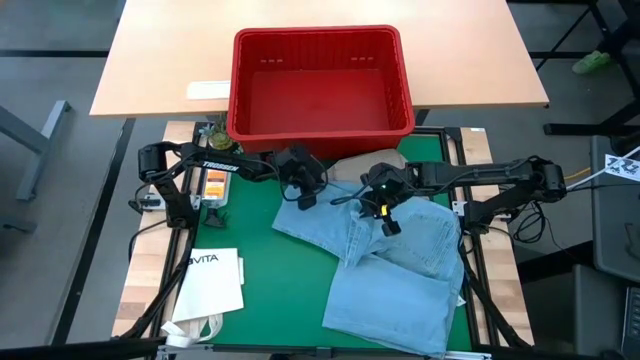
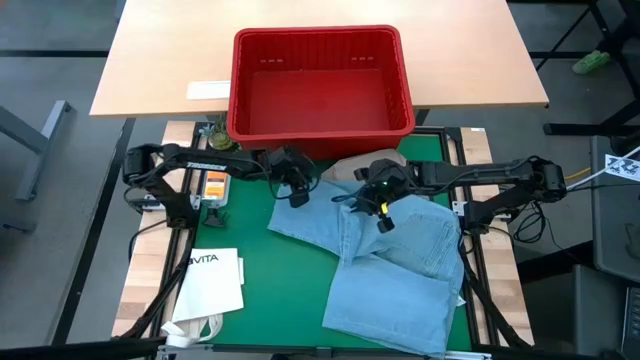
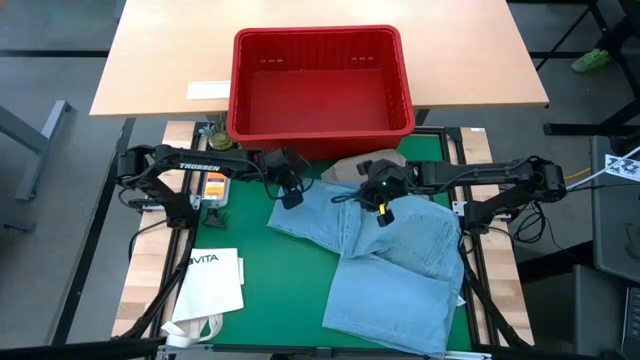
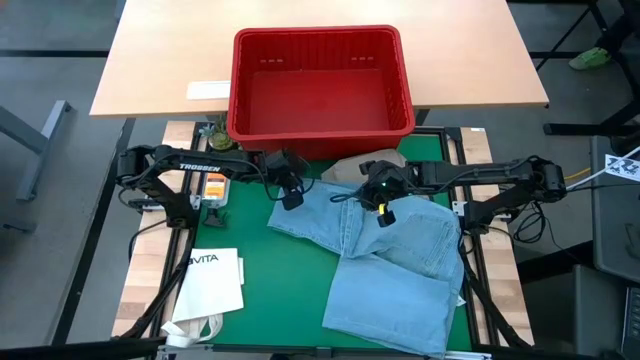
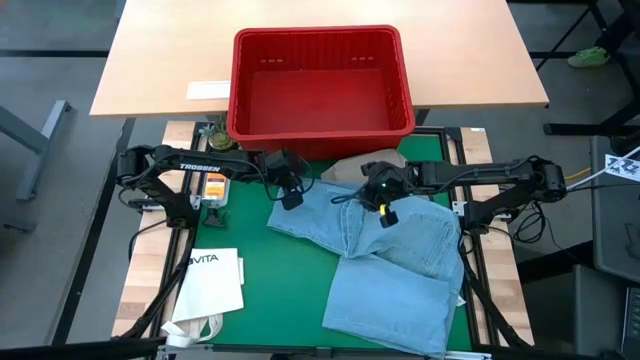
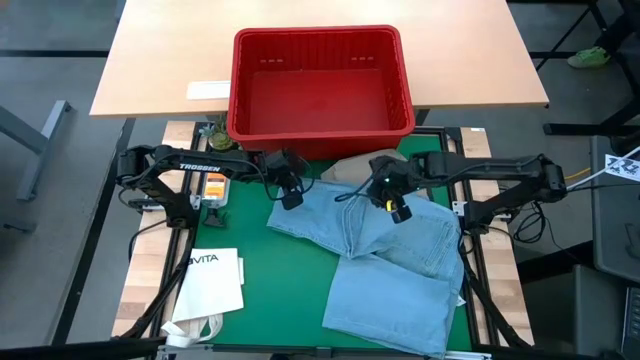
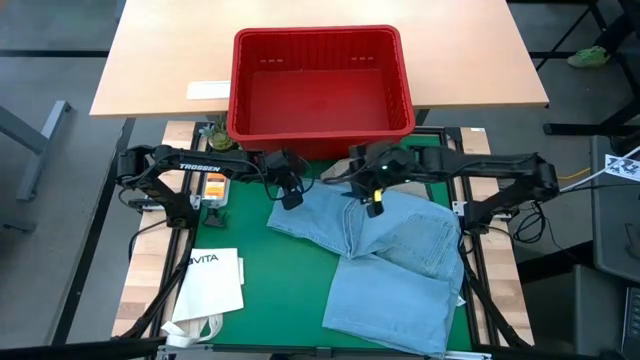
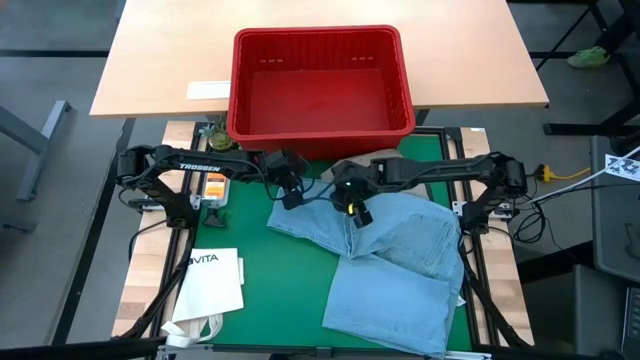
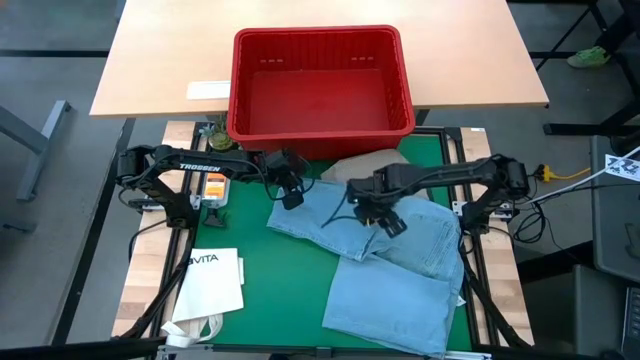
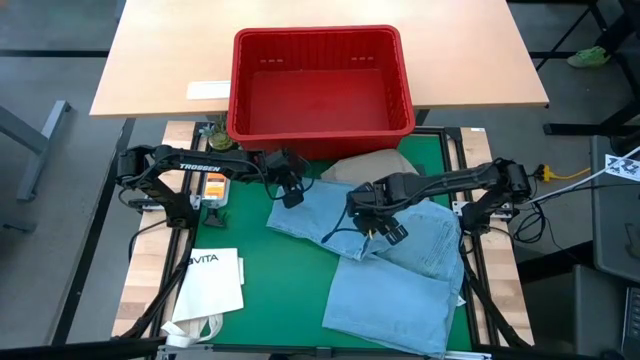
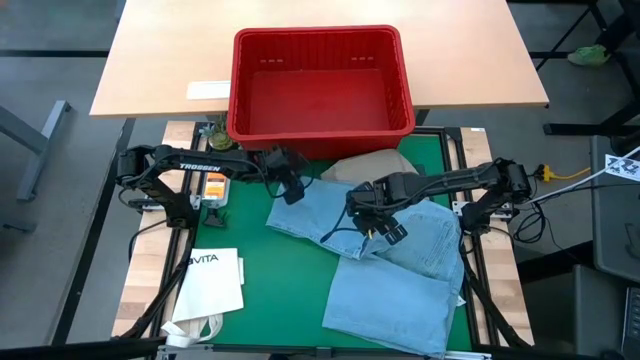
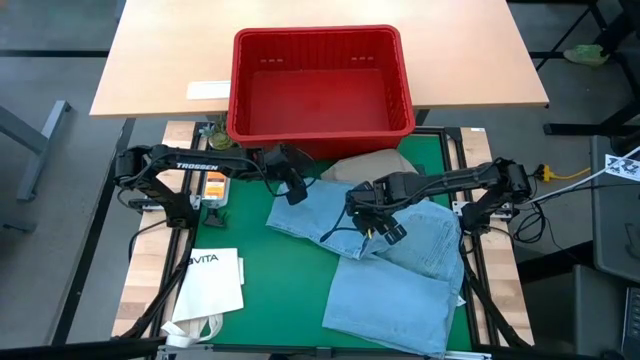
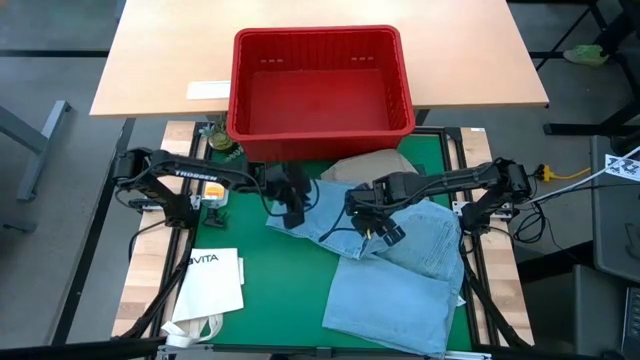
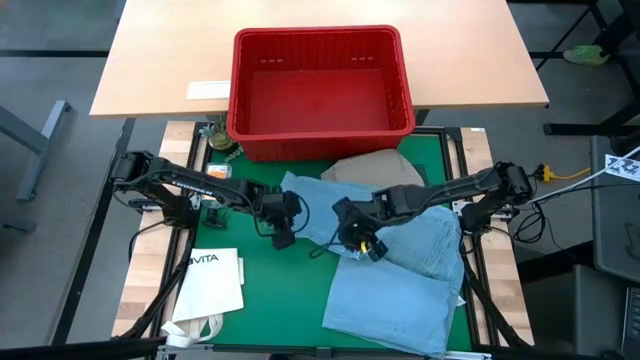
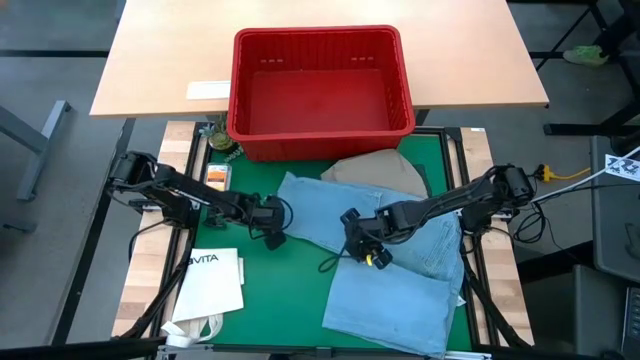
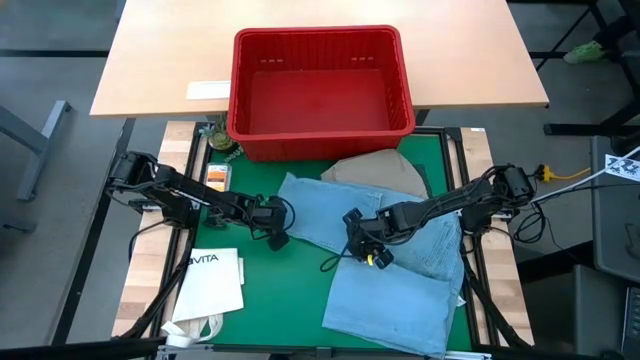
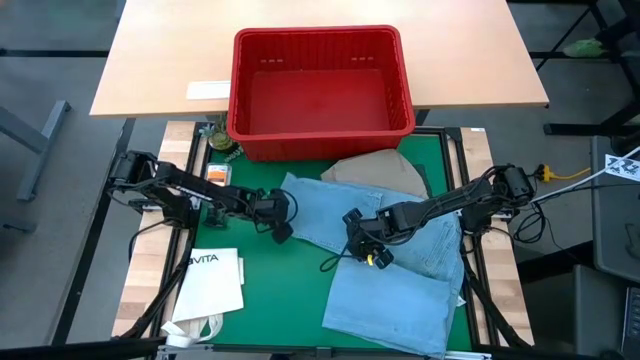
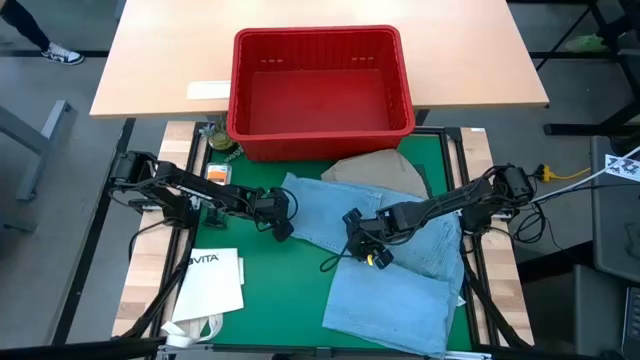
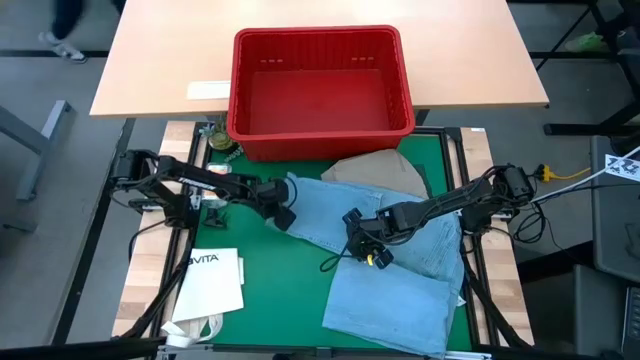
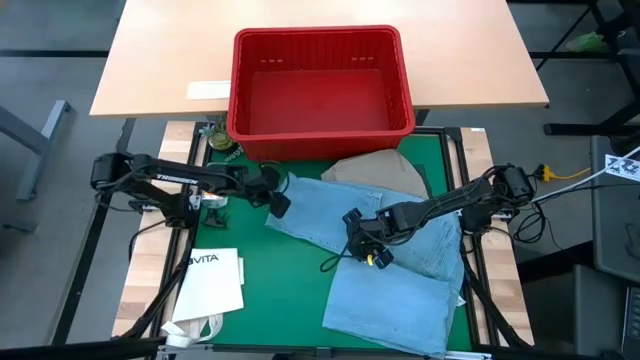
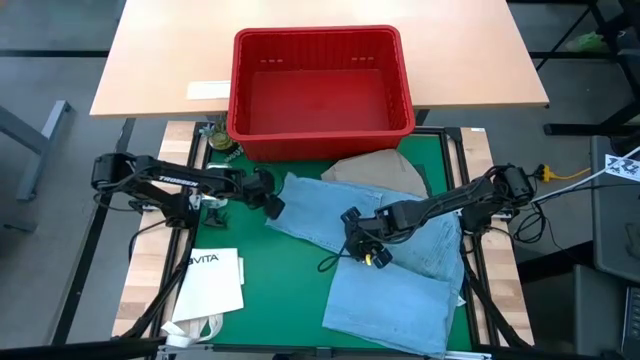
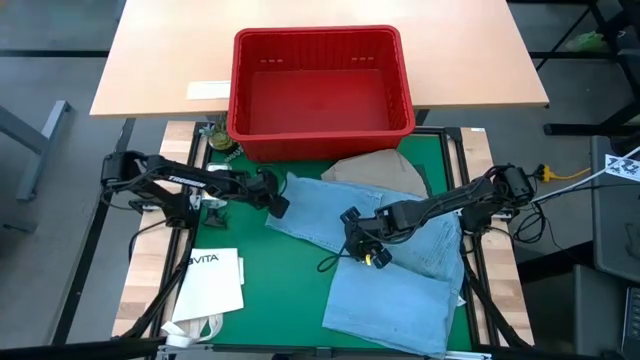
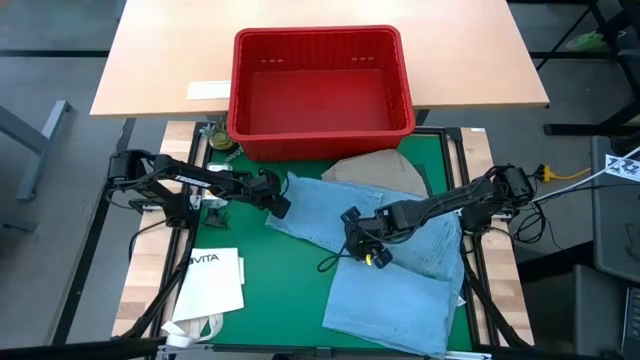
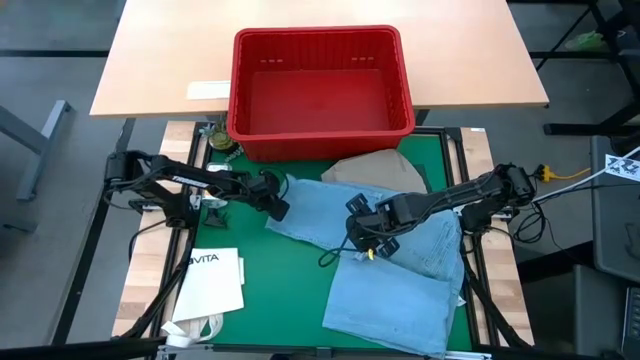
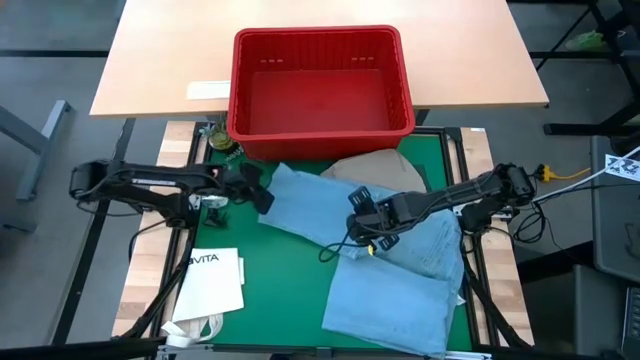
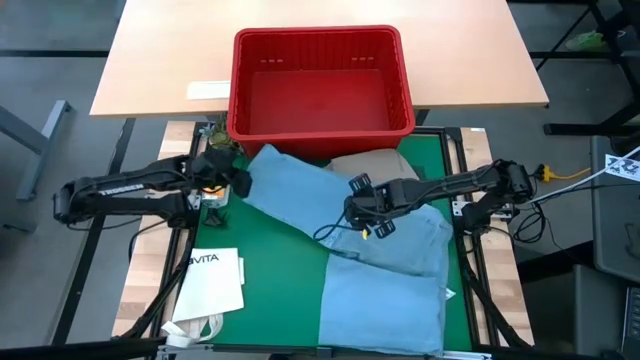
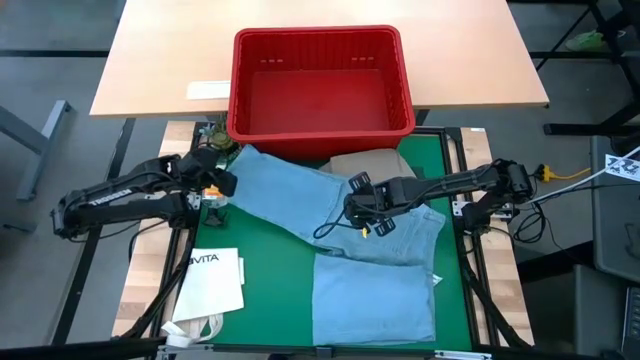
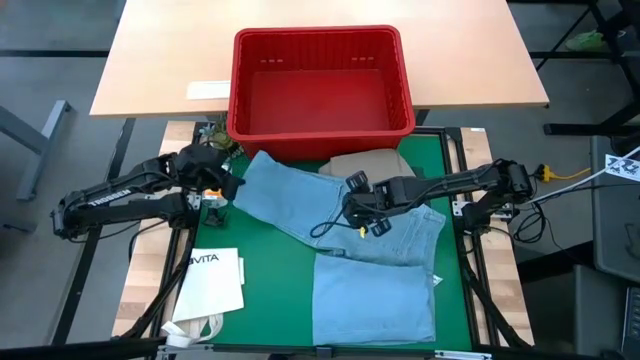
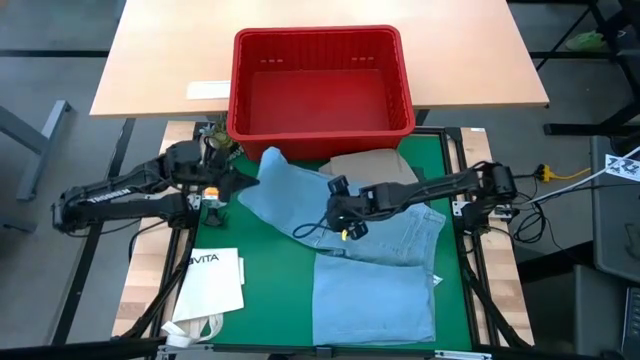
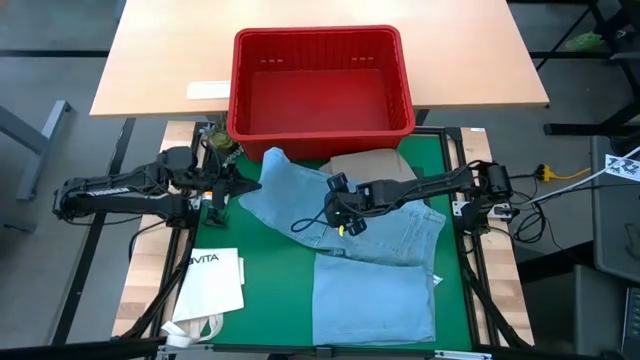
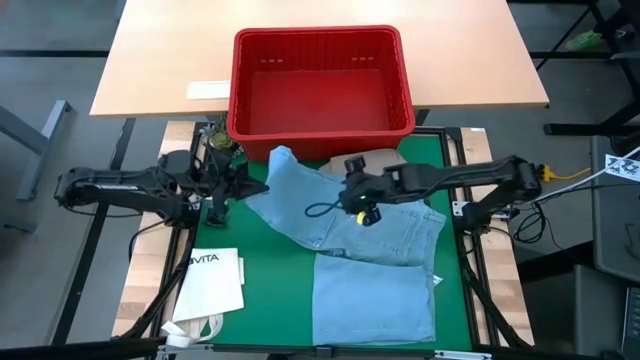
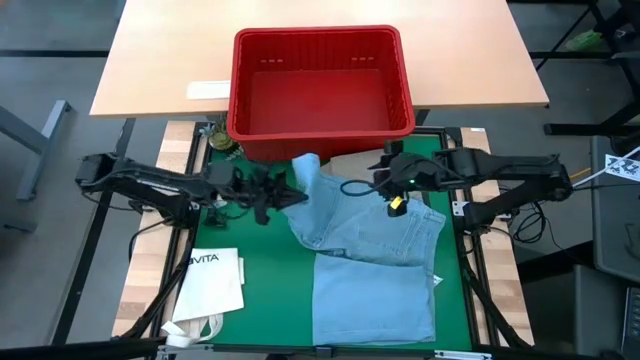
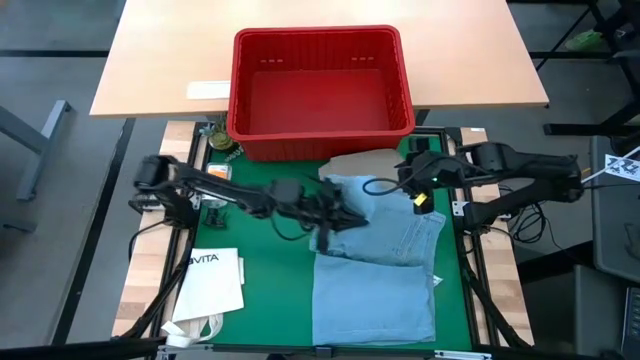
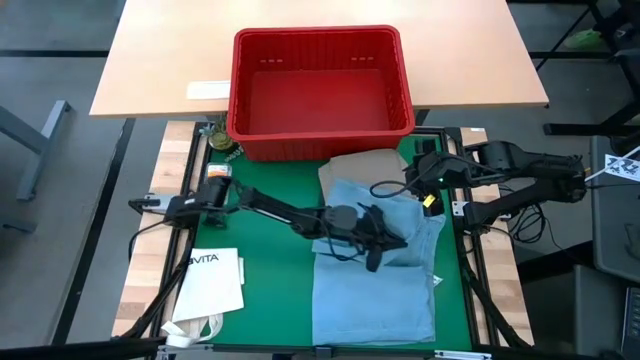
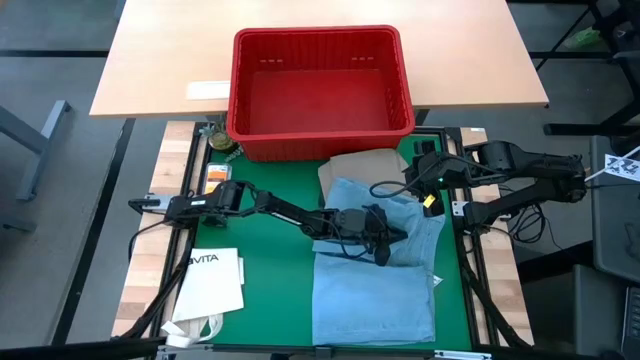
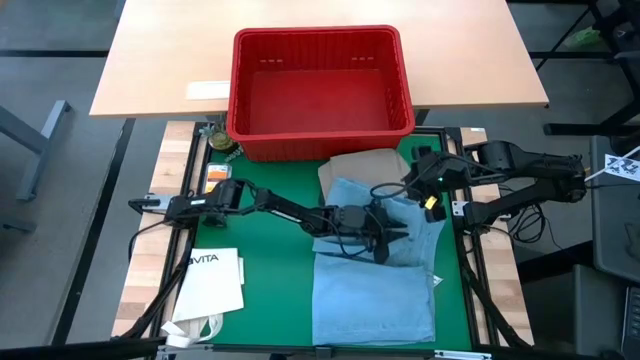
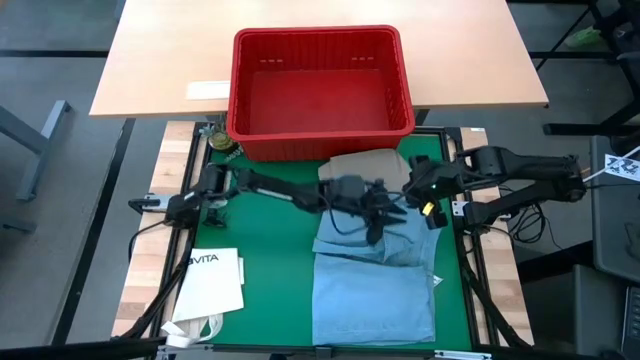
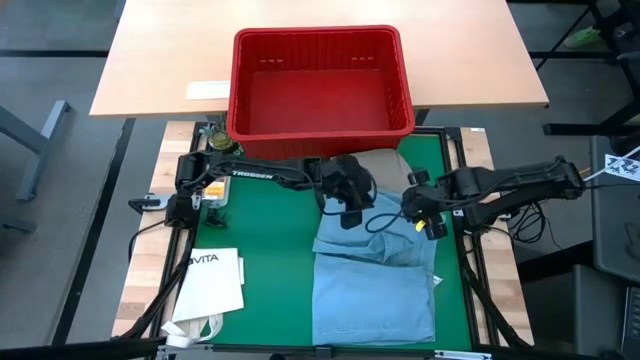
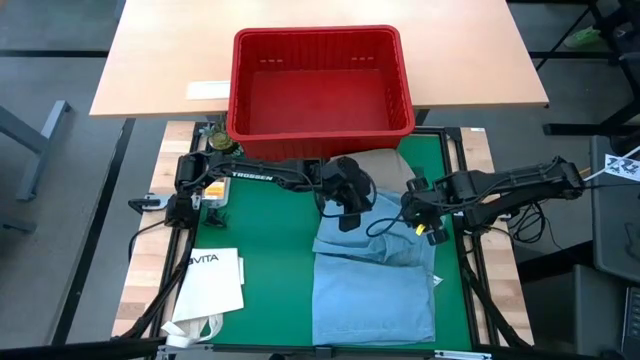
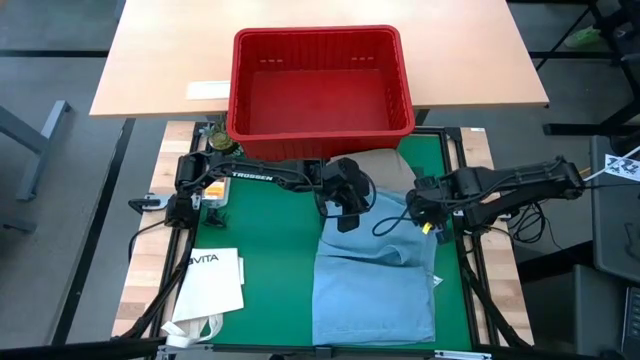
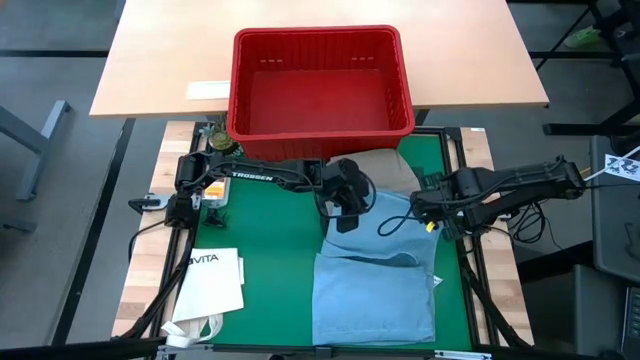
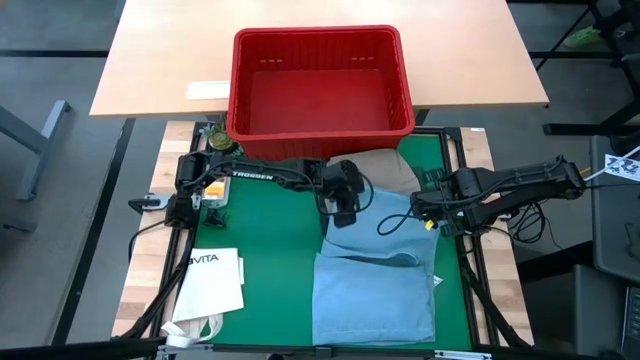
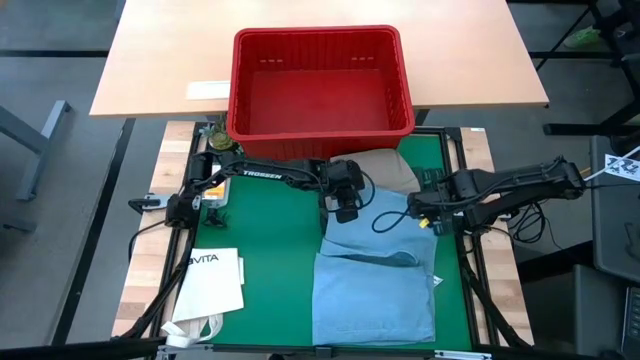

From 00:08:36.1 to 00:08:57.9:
Task: Fold Laundry from Bin
Fold the light blue pants
